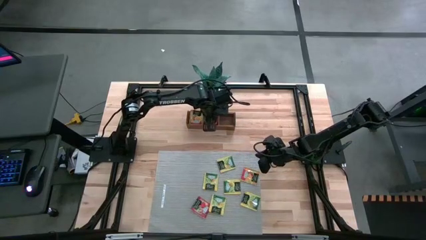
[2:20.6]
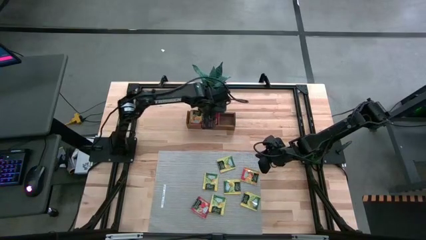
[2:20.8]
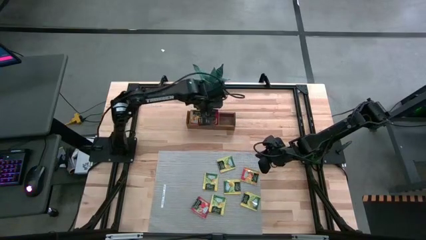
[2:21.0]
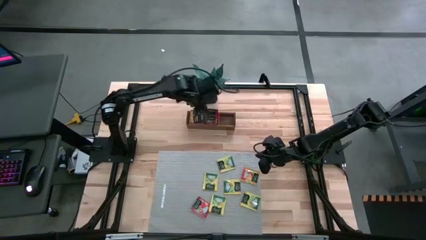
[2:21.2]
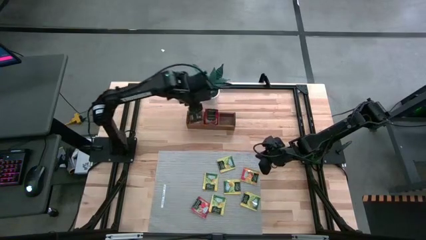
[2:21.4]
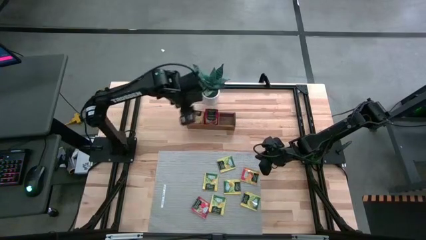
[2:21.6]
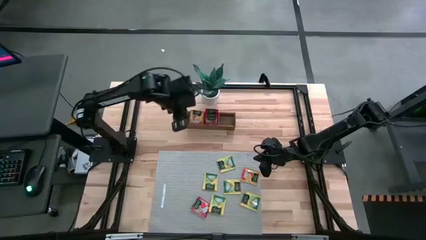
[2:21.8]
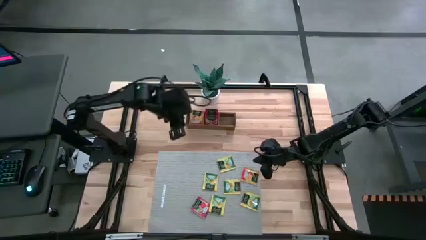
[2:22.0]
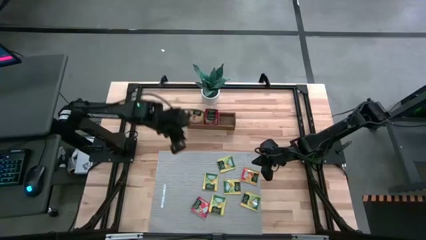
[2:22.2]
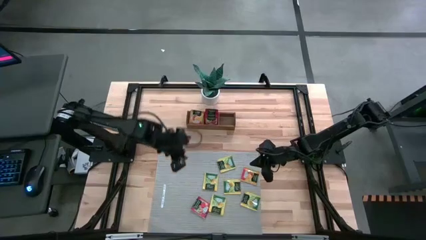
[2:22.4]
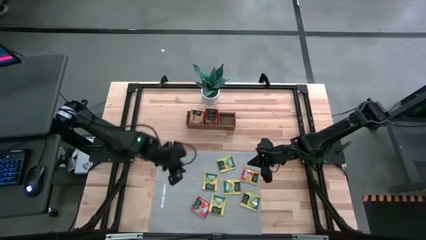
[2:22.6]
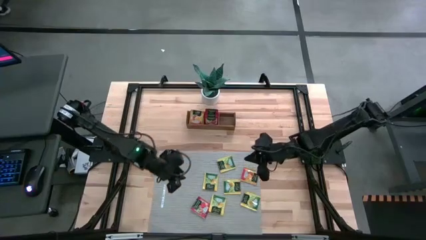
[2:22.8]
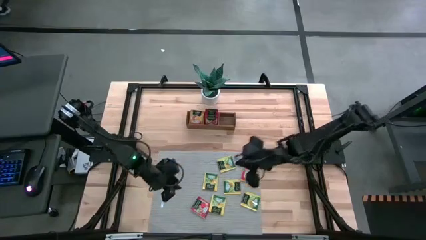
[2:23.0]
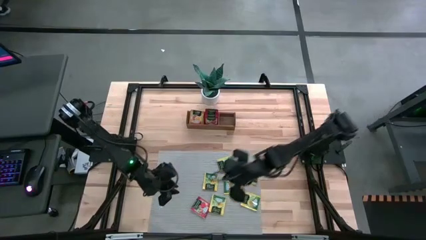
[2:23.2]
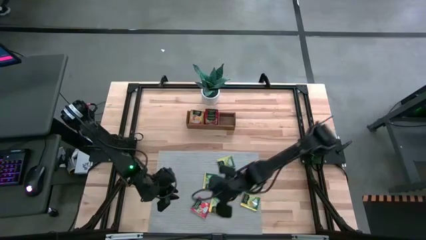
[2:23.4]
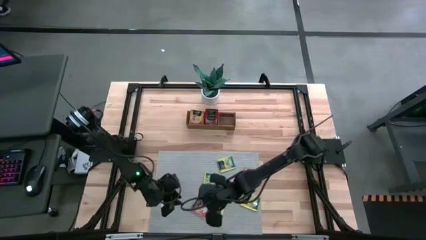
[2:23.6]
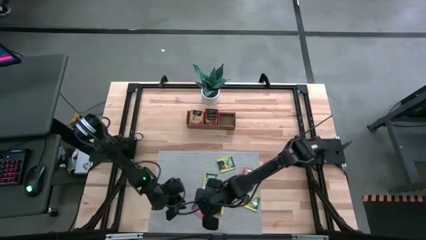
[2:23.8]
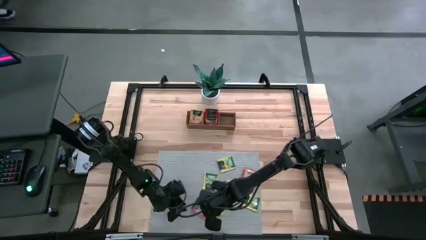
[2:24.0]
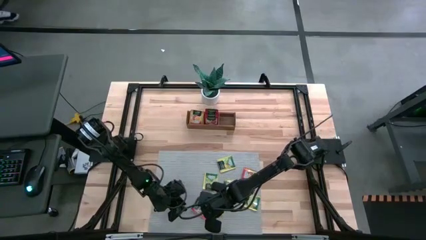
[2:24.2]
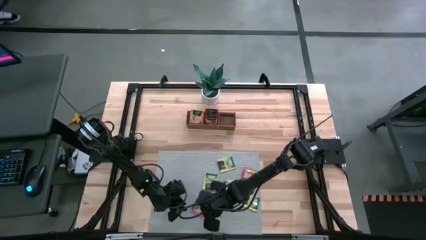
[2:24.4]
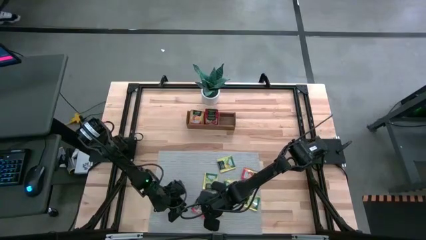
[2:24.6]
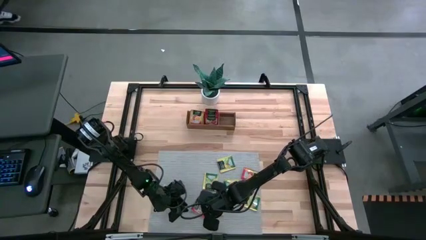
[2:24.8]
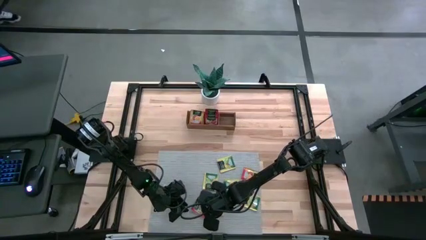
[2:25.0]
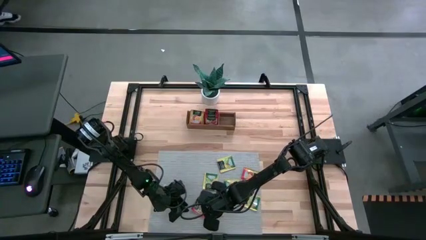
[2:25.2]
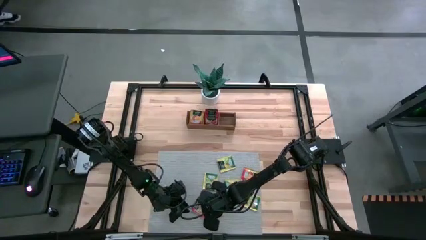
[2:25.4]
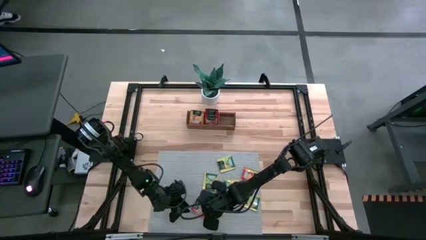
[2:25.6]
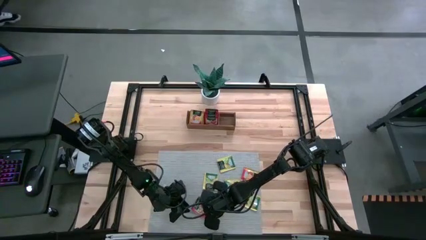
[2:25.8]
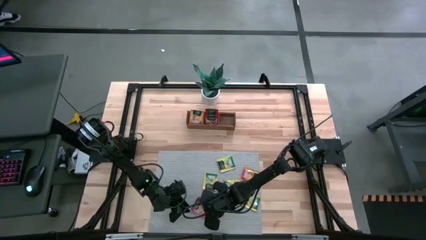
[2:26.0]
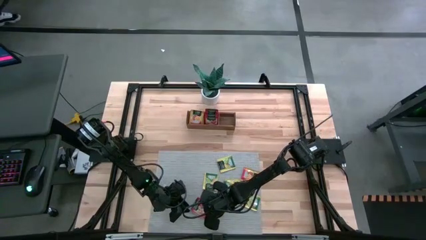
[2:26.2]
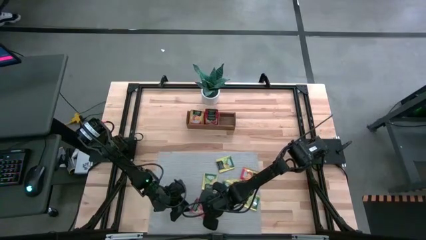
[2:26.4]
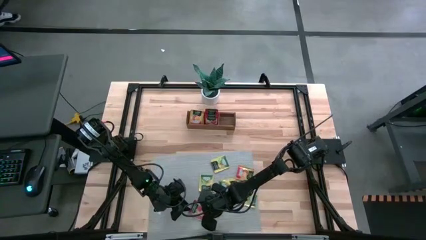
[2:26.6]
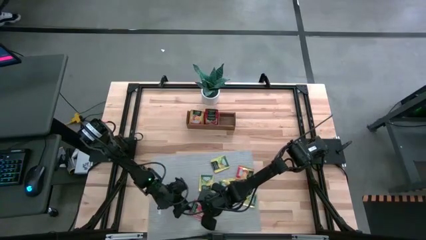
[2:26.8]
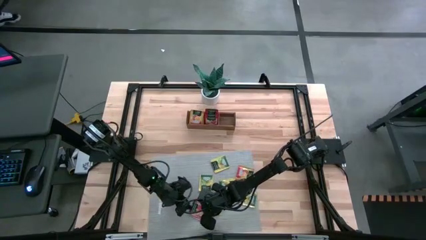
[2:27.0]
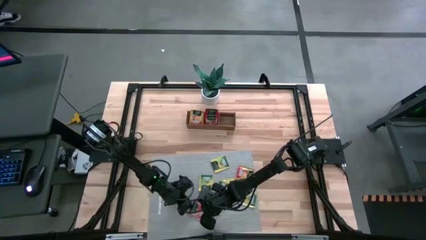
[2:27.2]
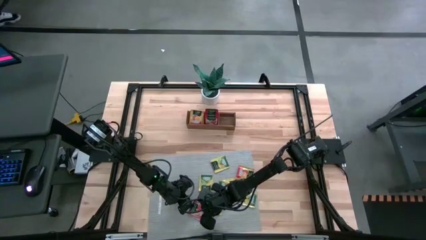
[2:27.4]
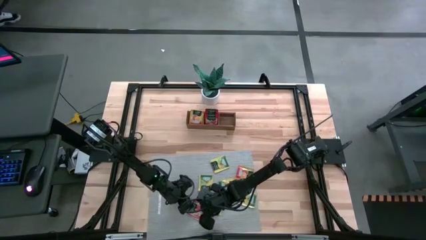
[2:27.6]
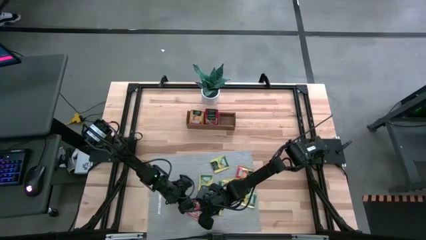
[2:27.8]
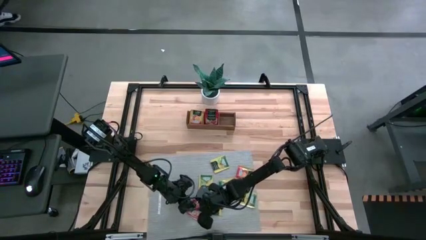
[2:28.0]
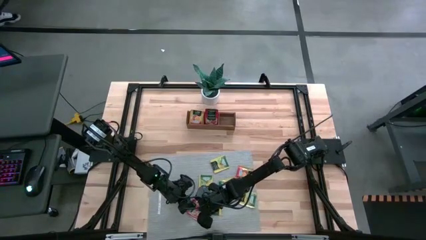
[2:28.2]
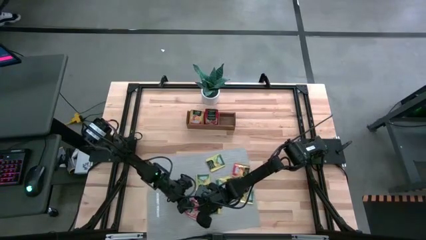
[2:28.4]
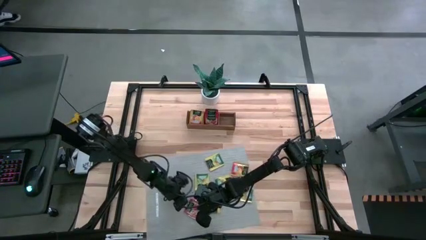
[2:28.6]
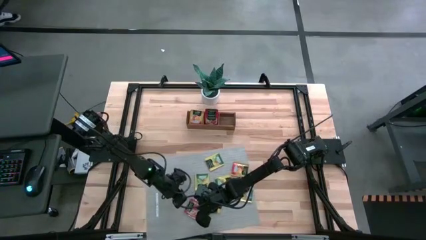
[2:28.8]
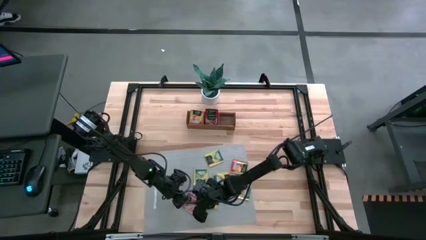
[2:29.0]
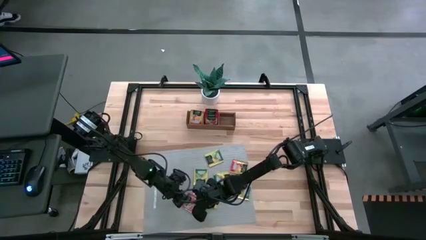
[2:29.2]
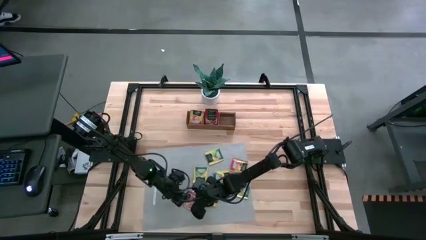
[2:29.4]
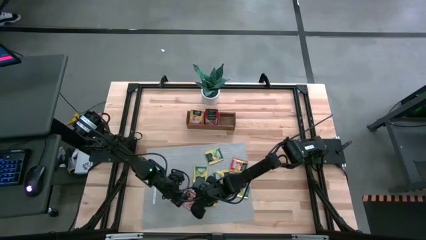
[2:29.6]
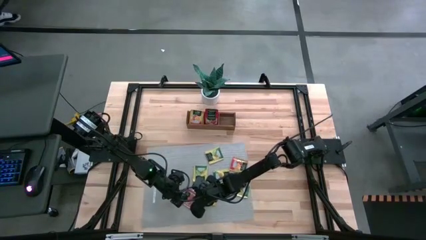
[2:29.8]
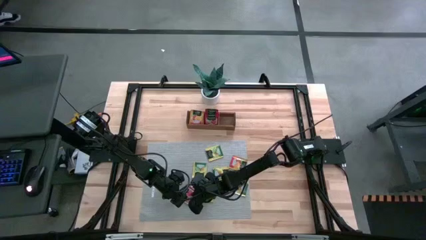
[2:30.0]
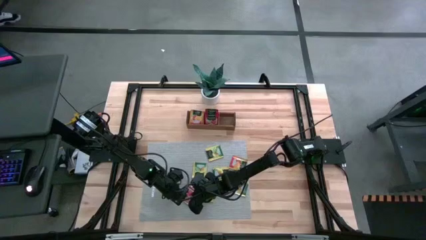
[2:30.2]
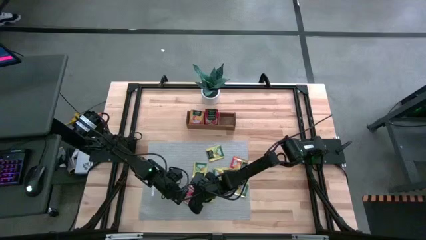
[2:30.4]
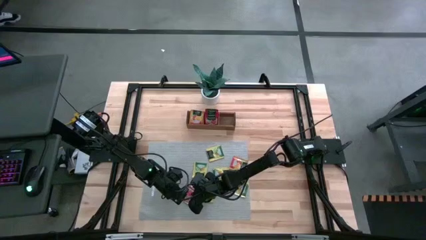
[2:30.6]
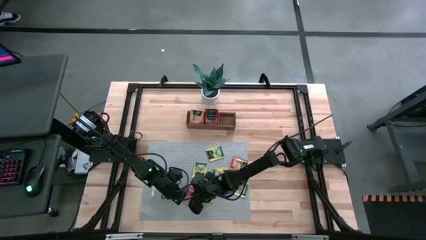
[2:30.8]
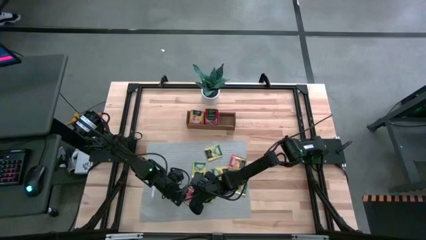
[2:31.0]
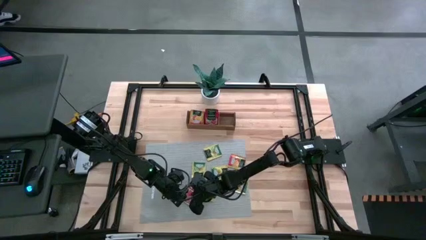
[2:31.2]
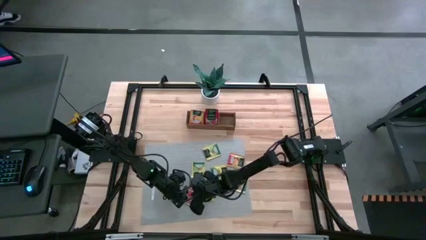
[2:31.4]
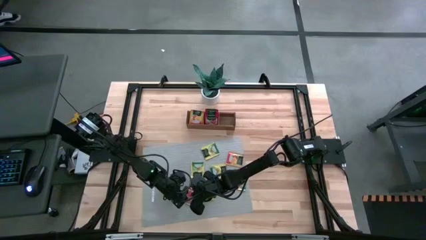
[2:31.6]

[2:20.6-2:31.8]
Task: Pick & Place Tea
Put the red tea bag into the middle section of the wooden organizer
